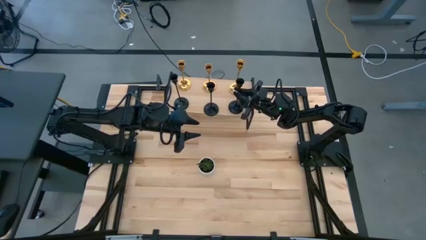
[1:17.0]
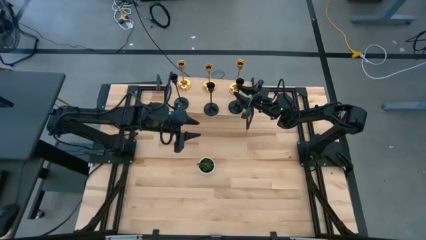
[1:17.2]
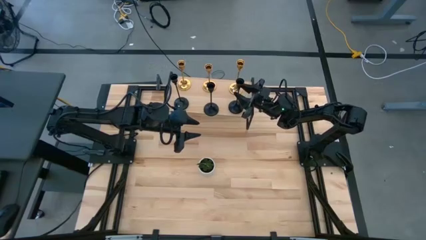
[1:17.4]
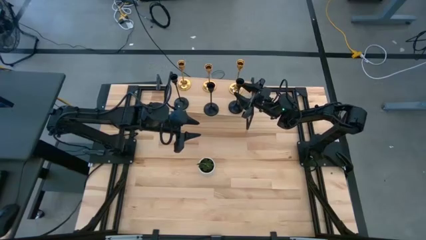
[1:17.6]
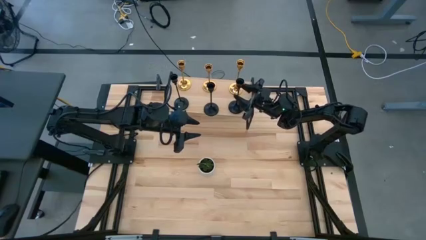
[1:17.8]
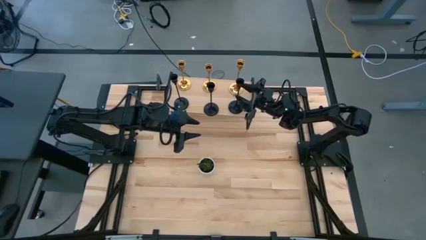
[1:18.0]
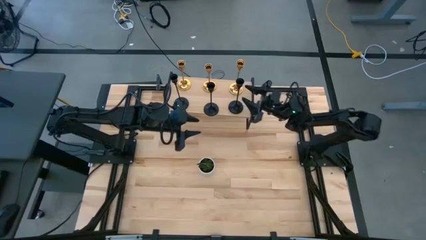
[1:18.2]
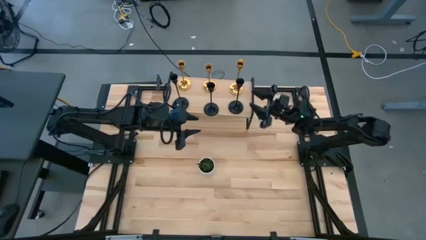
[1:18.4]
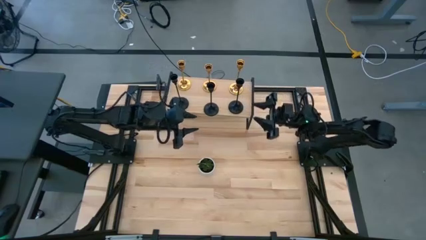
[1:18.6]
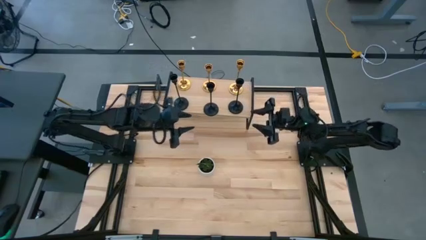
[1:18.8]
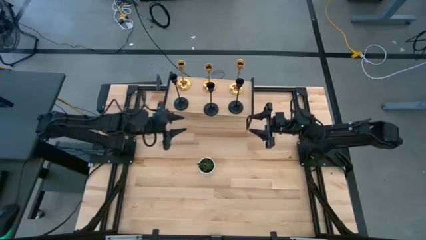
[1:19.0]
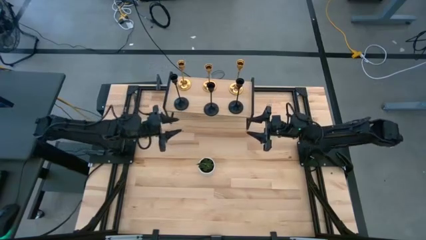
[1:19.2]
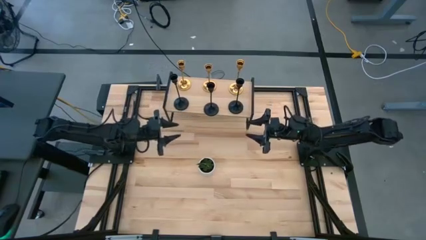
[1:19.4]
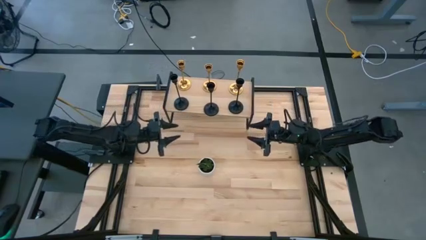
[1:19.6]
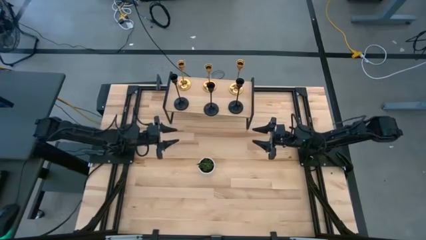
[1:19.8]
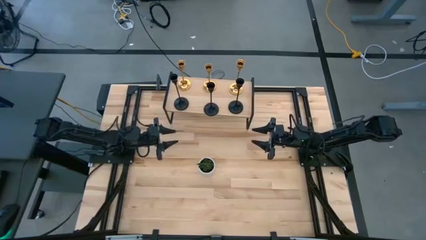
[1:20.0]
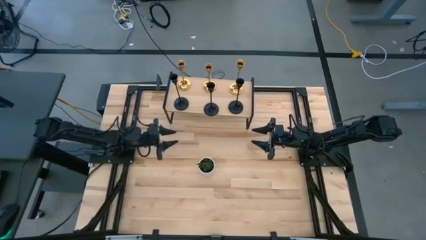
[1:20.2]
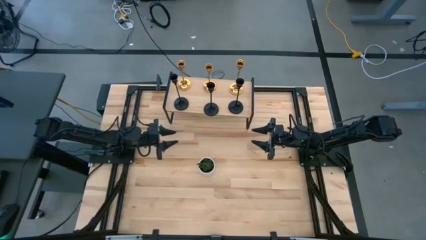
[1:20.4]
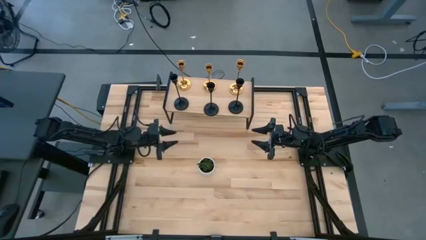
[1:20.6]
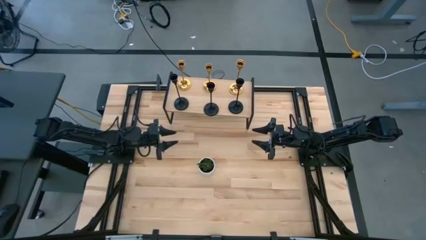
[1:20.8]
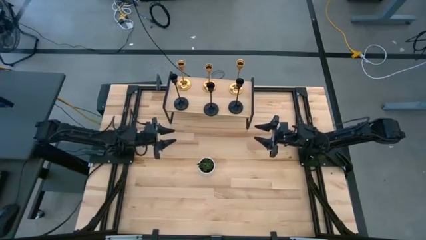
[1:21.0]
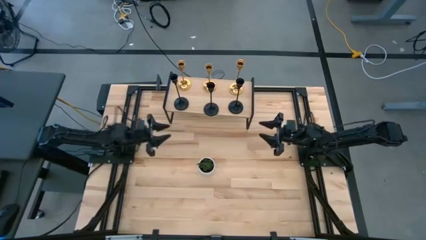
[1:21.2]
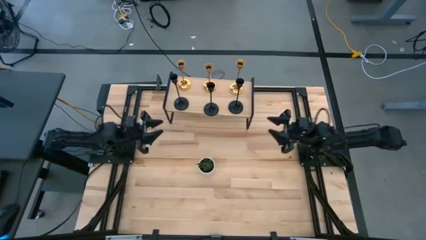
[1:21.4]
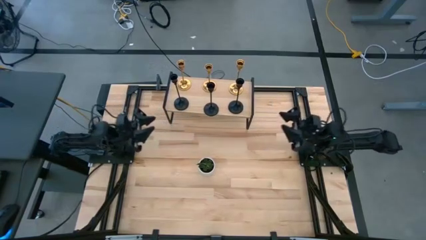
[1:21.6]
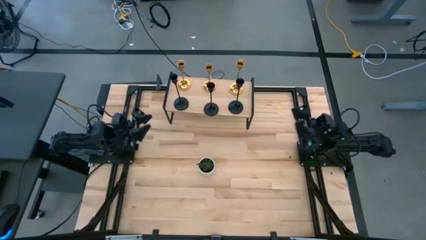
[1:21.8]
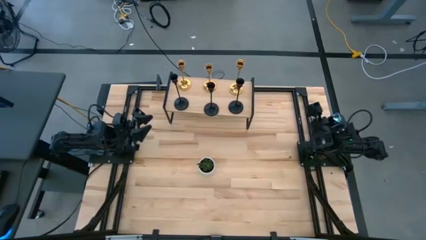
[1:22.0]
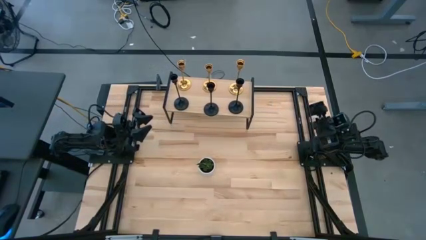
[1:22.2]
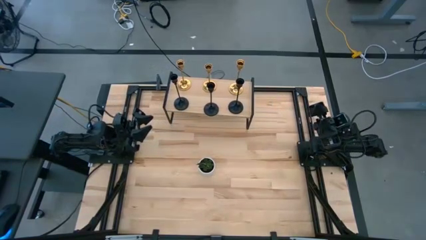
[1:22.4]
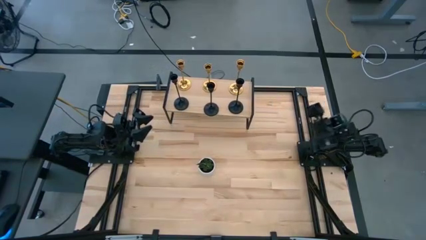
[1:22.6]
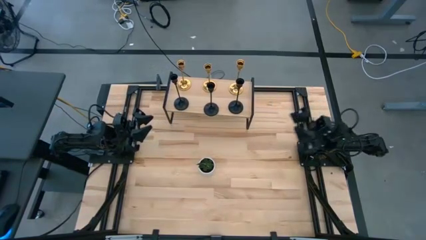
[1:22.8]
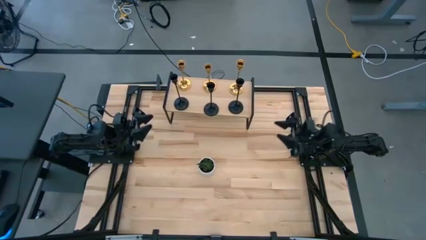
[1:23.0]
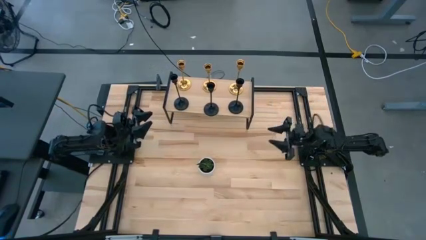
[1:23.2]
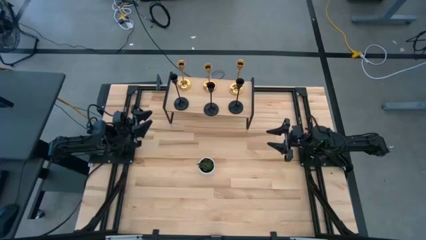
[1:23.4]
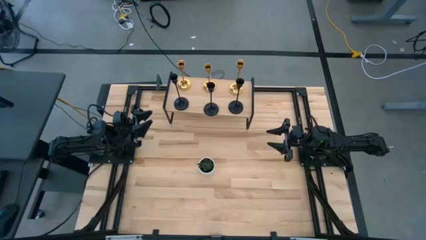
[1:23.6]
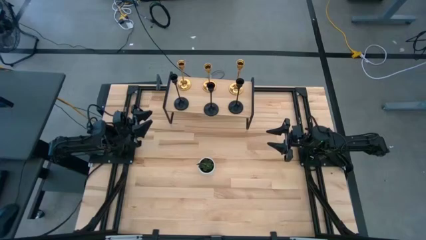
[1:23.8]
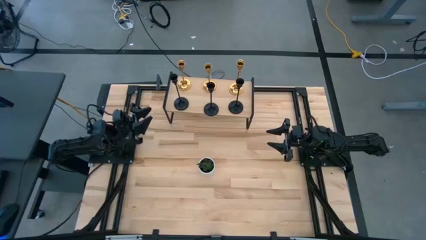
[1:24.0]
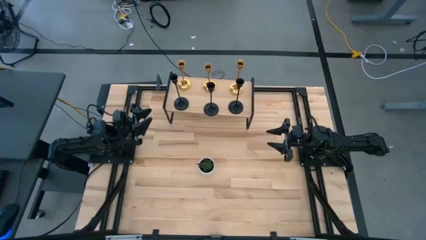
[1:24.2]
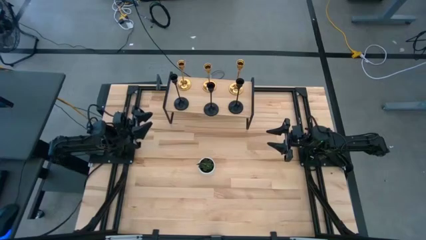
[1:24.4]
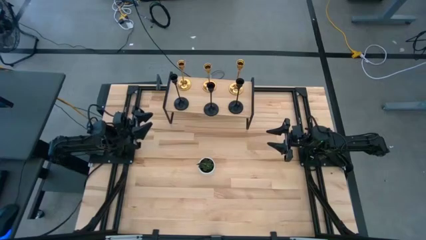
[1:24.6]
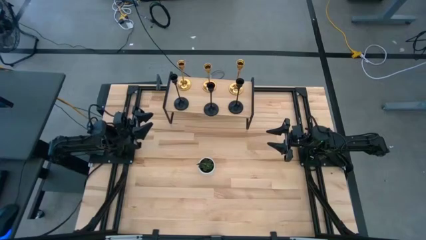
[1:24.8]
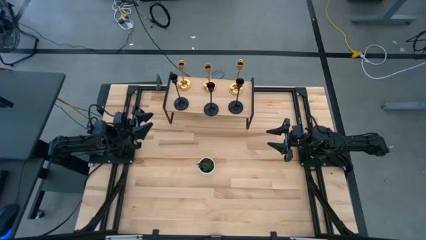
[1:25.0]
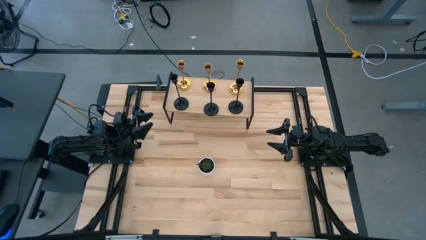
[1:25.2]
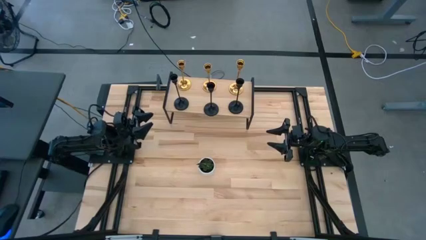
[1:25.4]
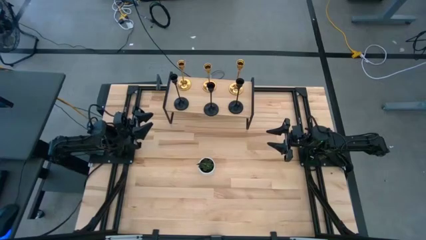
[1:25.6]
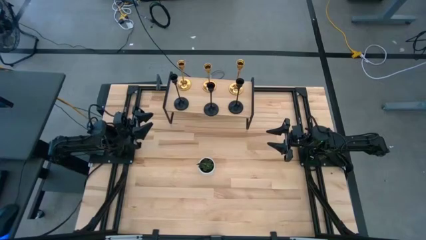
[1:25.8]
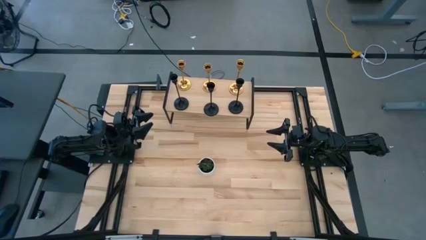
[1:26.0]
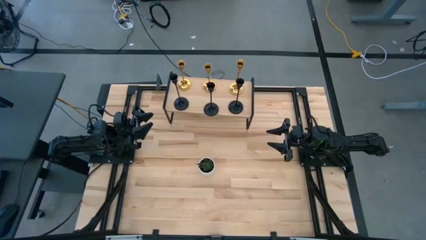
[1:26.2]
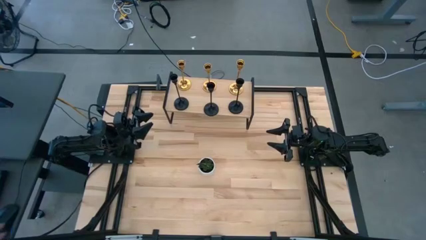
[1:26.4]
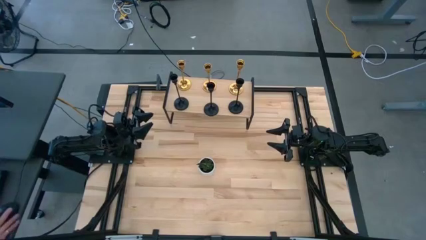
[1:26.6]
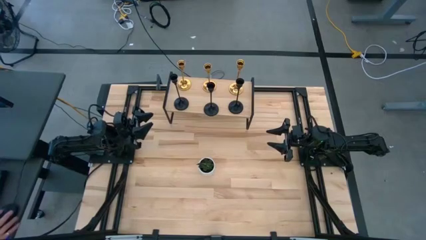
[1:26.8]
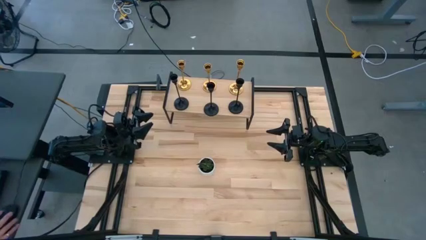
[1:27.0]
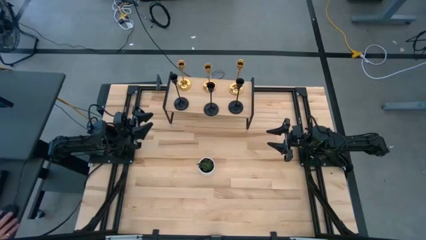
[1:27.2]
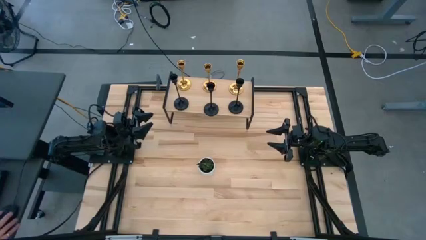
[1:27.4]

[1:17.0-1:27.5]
Task: Pick & Place candle stick holders
Return to Home Position

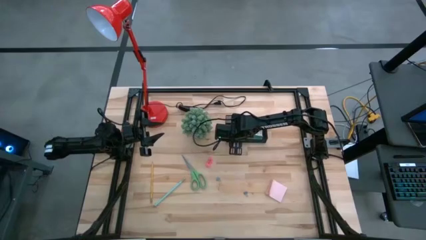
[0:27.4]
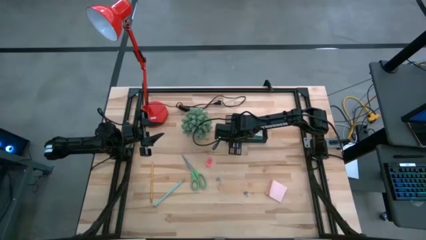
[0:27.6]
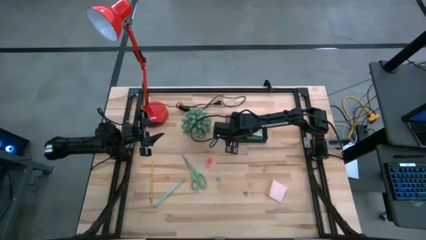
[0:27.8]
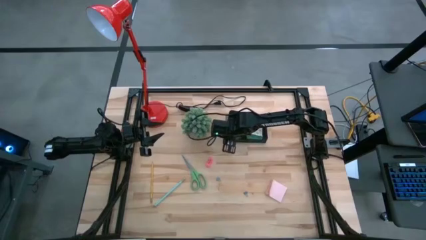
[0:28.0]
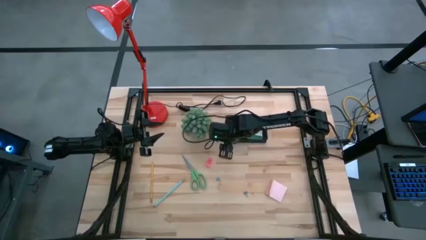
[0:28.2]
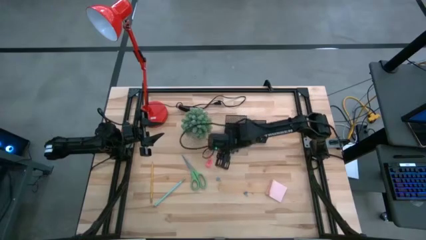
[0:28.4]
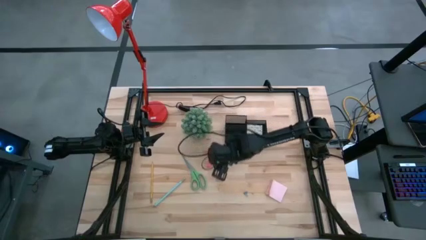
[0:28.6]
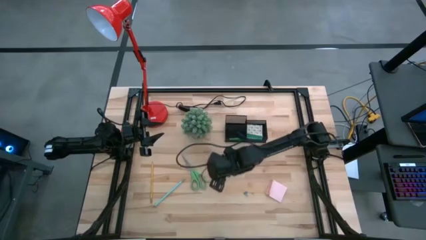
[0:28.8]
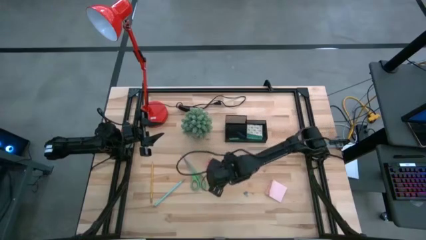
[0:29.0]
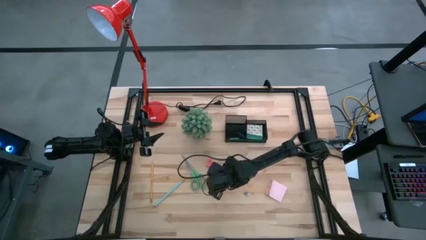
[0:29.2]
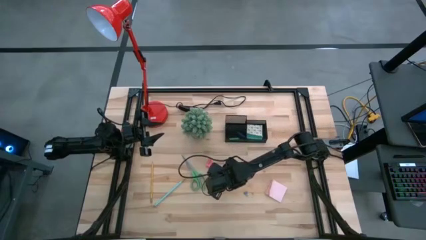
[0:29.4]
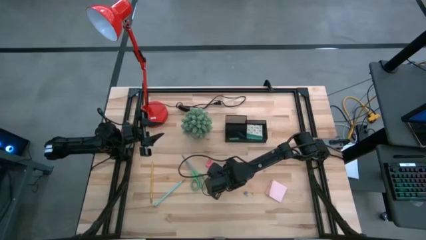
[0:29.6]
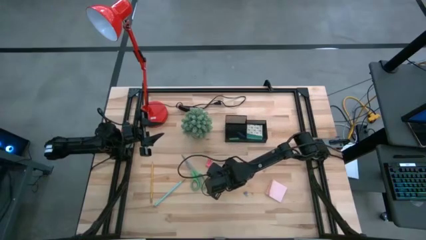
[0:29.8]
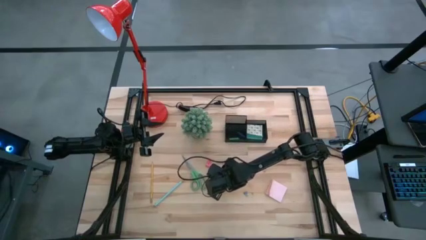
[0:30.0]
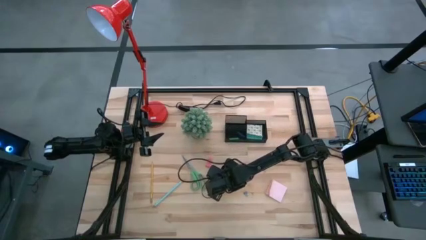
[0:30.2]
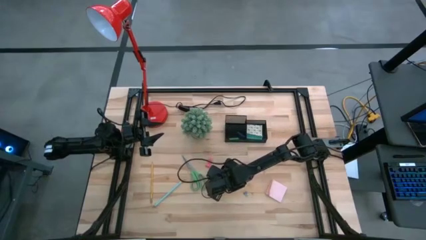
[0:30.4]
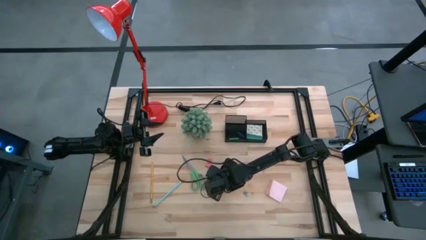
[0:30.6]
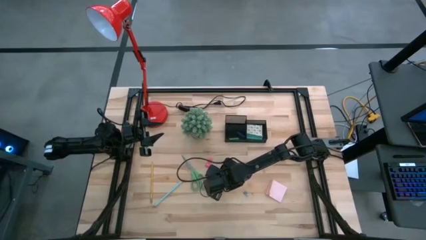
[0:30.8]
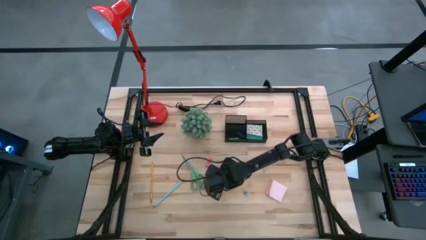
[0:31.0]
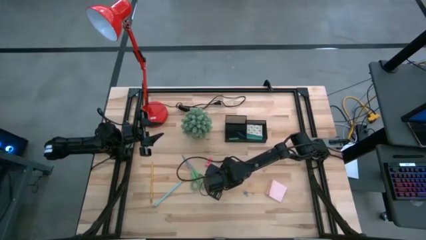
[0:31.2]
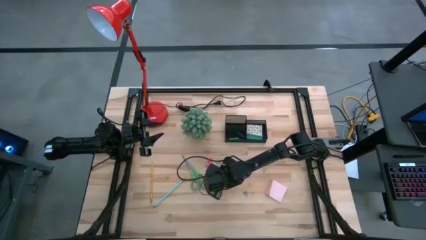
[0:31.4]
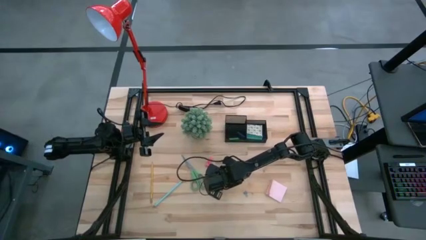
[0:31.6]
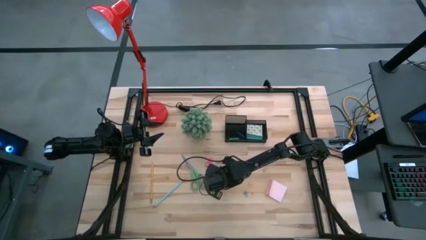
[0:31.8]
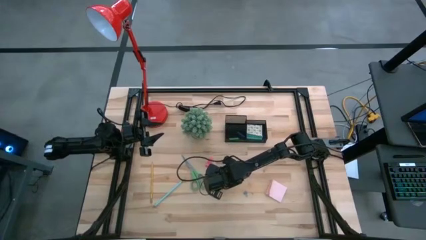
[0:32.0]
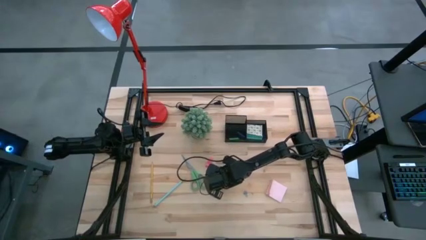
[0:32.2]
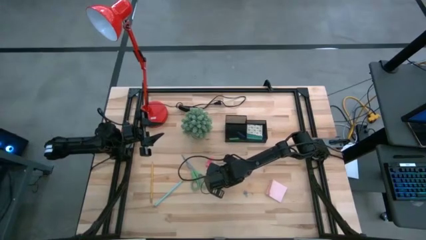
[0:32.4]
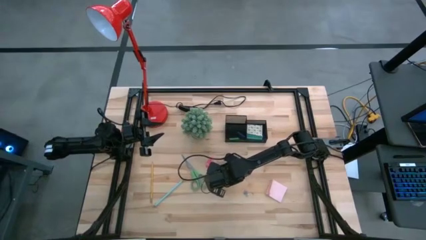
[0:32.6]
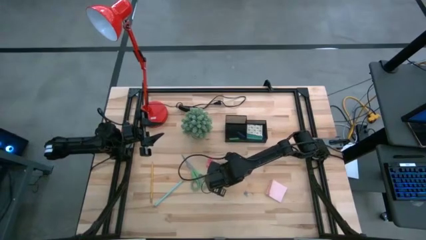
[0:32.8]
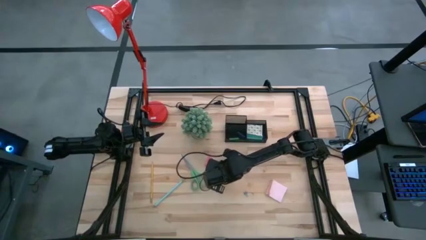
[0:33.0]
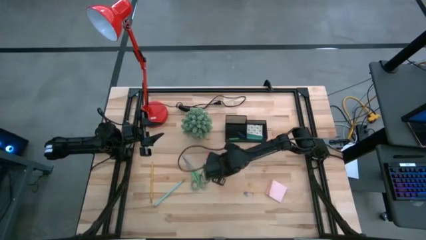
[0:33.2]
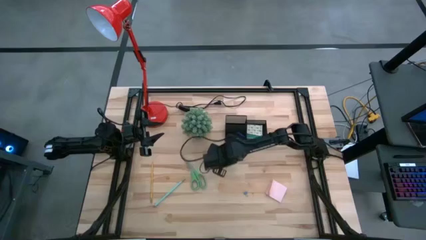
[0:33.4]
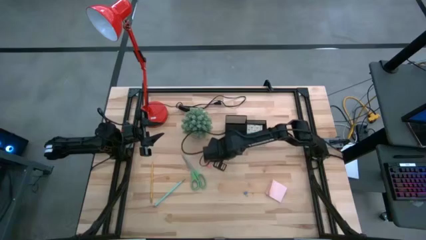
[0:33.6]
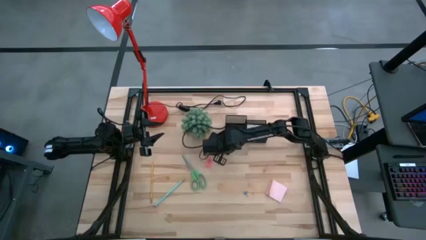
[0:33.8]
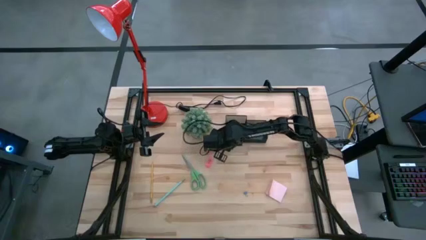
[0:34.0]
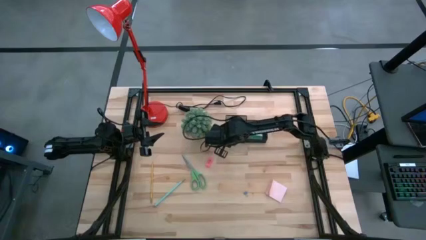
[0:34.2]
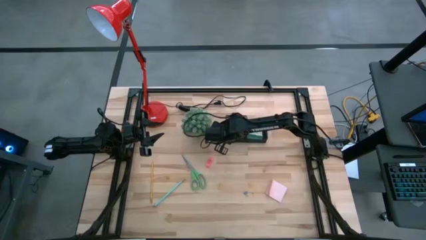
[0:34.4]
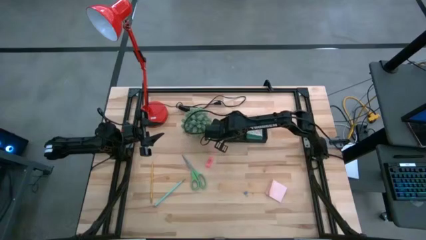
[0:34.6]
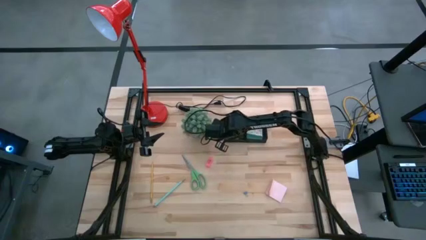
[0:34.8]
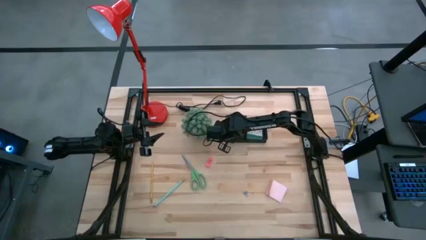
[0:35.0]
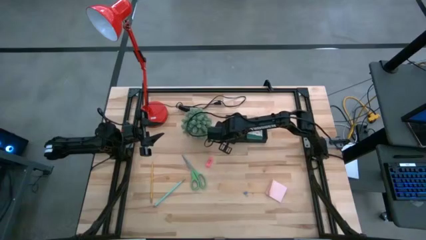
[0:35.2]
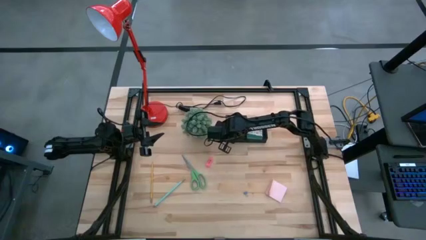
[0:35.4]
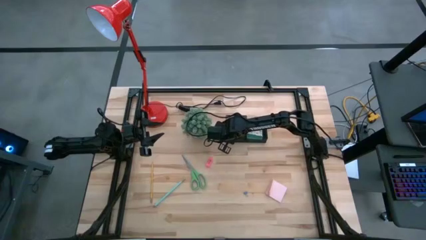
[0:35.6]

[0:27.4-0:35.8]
Task: Pick and place office supplies into organizer
Put the left blue binder clip into the black desk organizer
